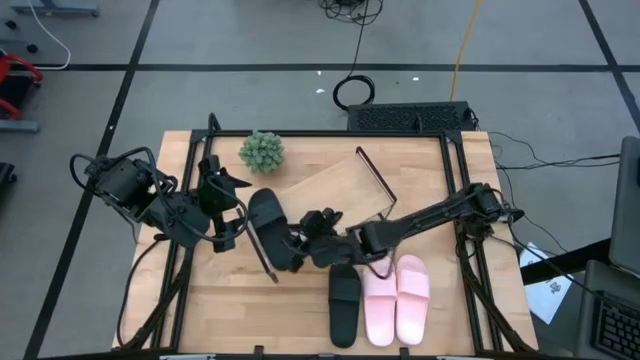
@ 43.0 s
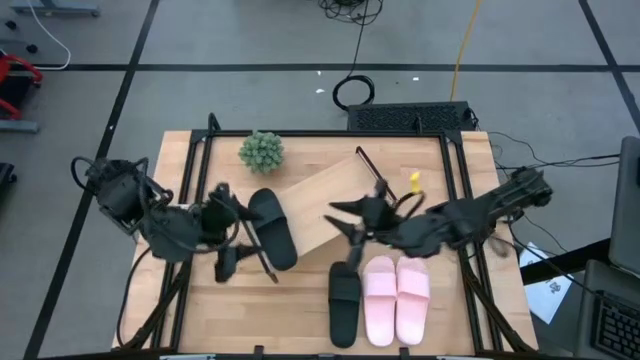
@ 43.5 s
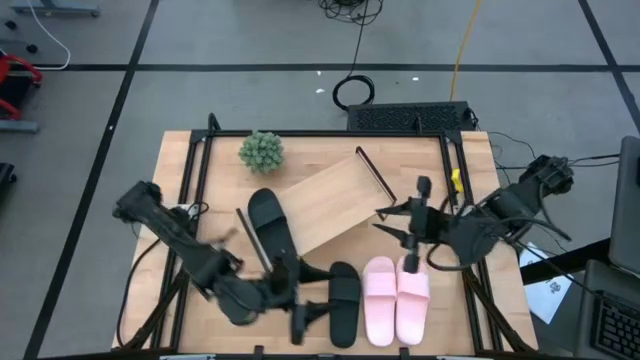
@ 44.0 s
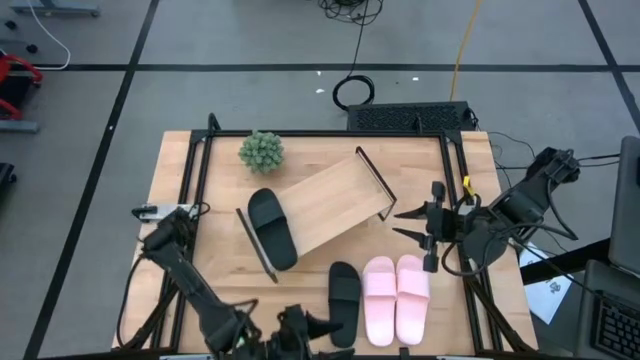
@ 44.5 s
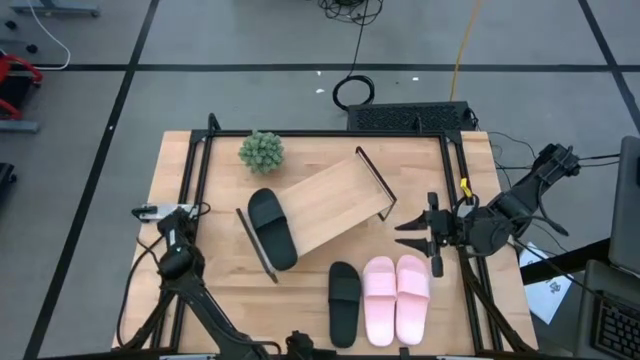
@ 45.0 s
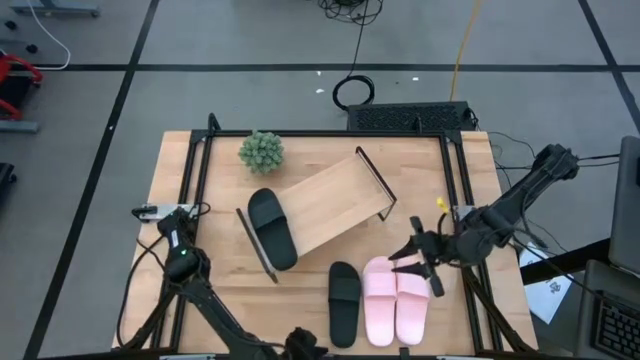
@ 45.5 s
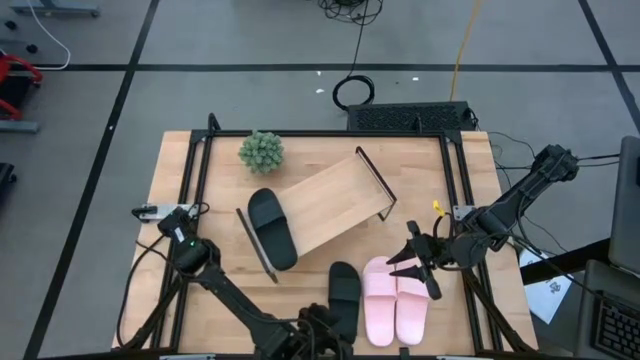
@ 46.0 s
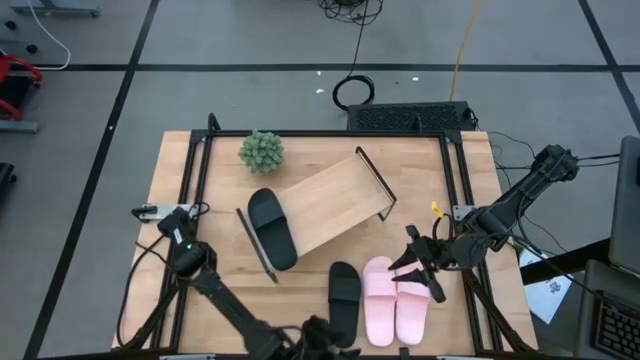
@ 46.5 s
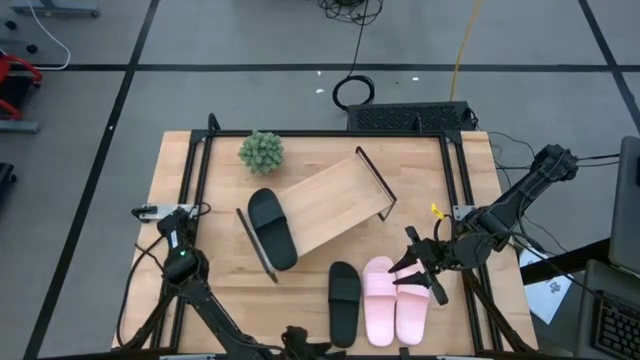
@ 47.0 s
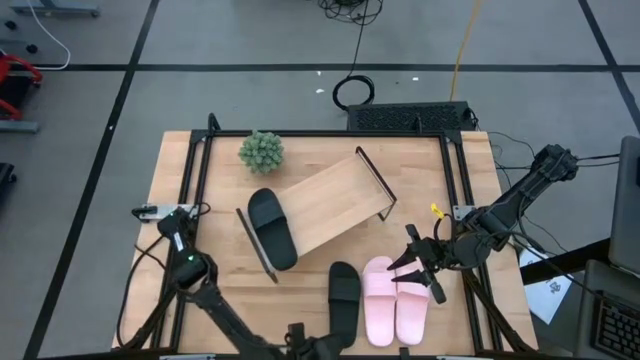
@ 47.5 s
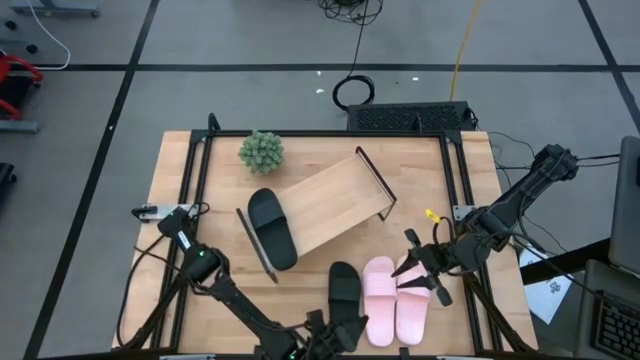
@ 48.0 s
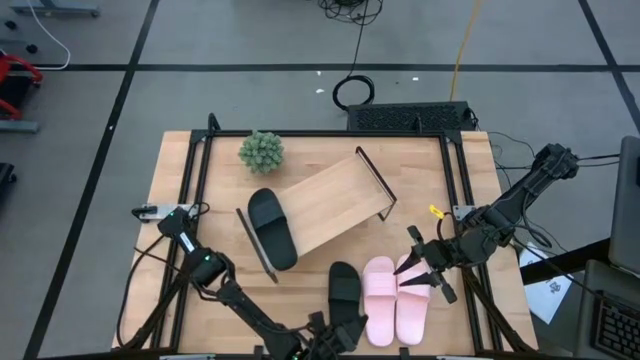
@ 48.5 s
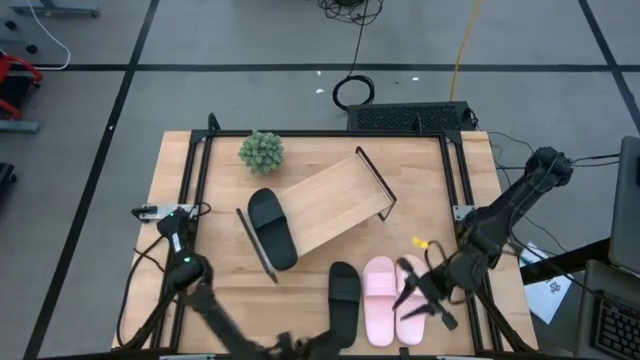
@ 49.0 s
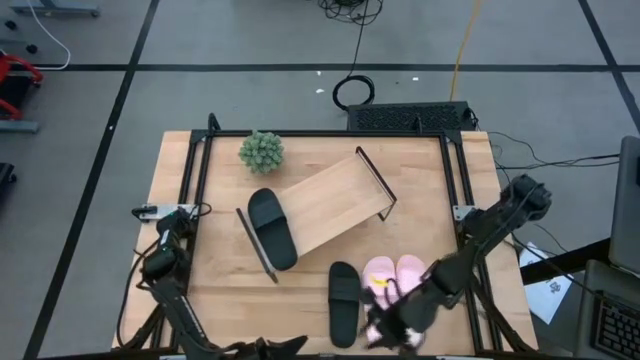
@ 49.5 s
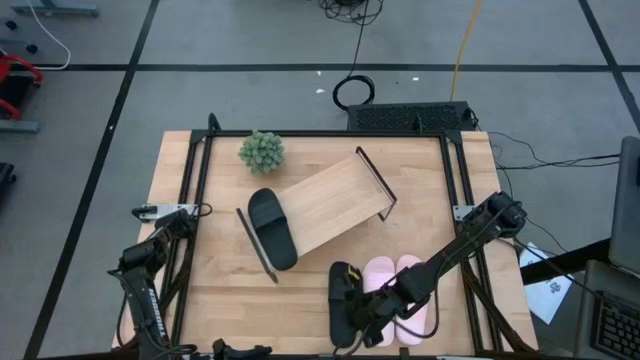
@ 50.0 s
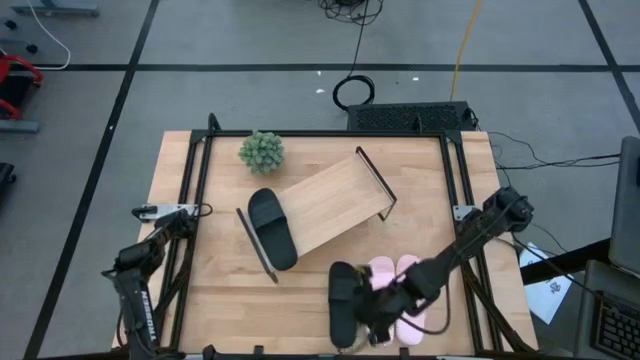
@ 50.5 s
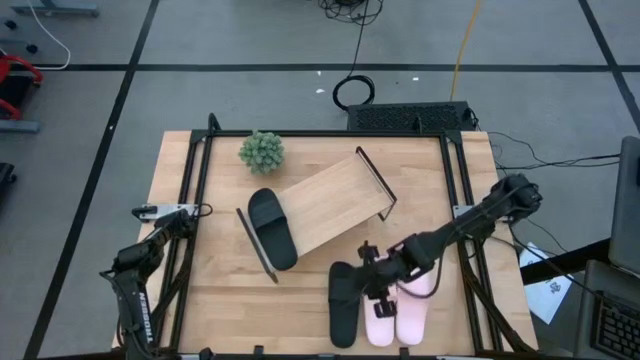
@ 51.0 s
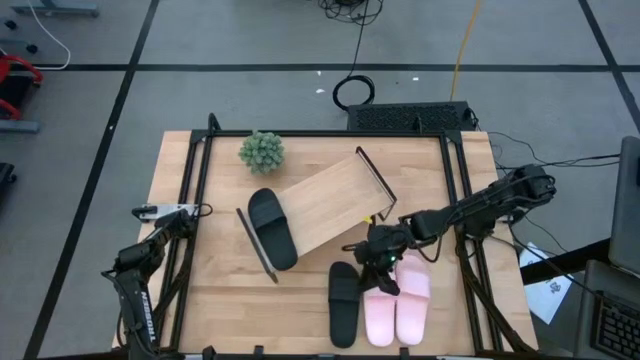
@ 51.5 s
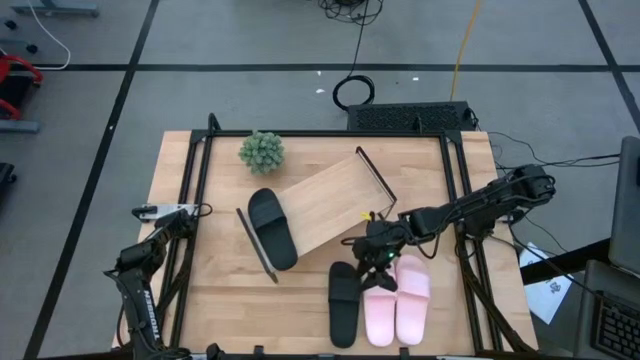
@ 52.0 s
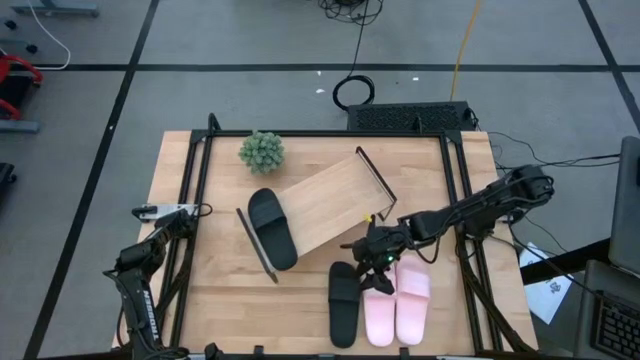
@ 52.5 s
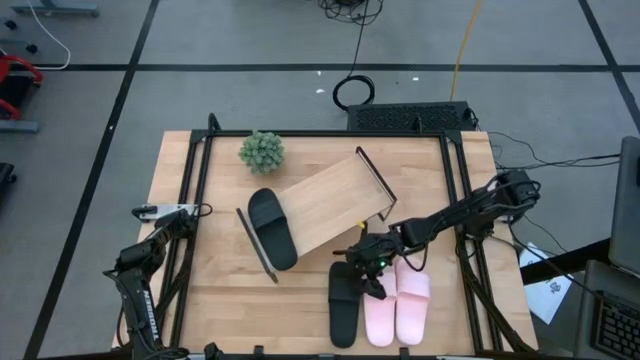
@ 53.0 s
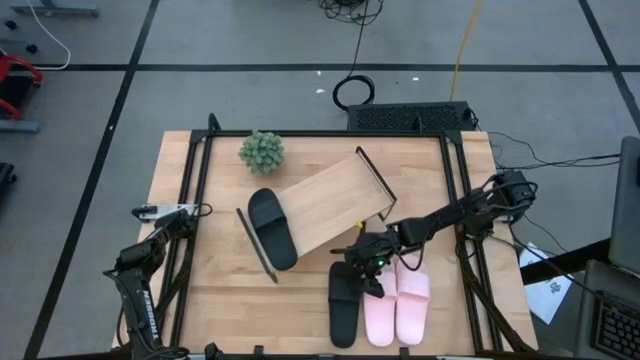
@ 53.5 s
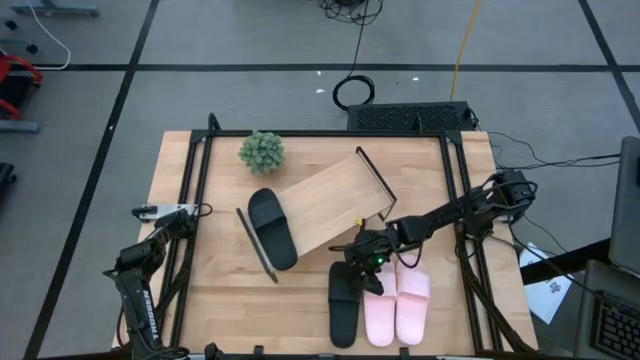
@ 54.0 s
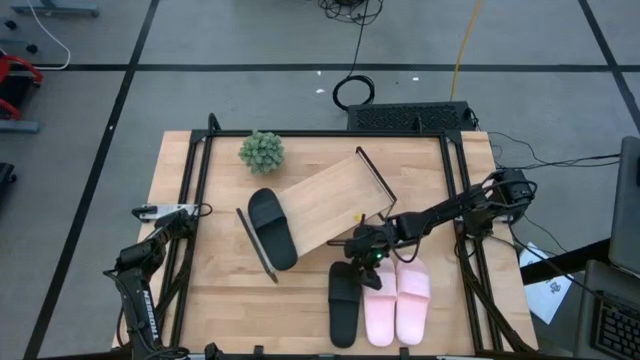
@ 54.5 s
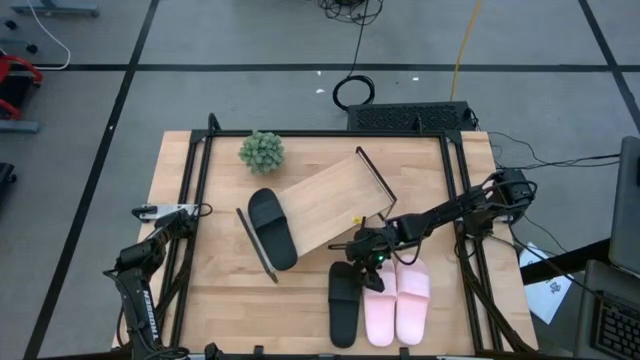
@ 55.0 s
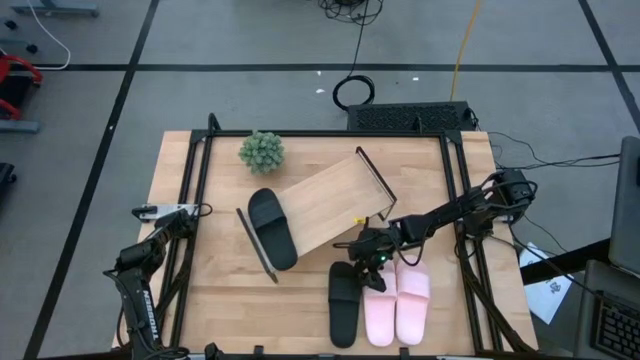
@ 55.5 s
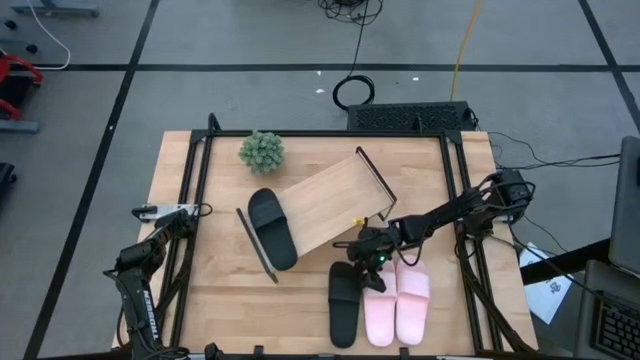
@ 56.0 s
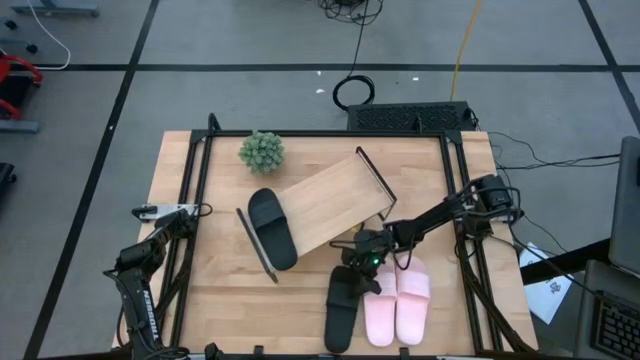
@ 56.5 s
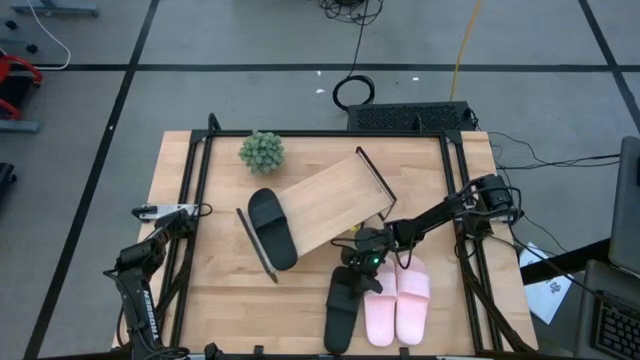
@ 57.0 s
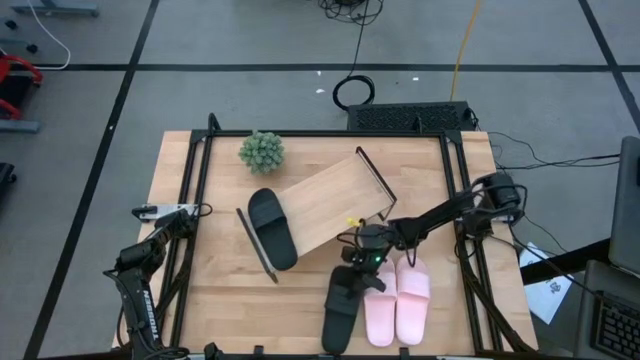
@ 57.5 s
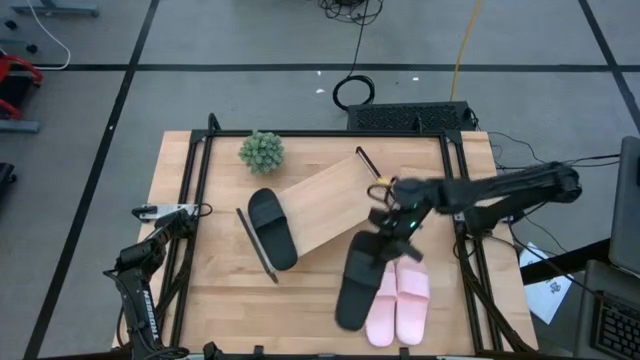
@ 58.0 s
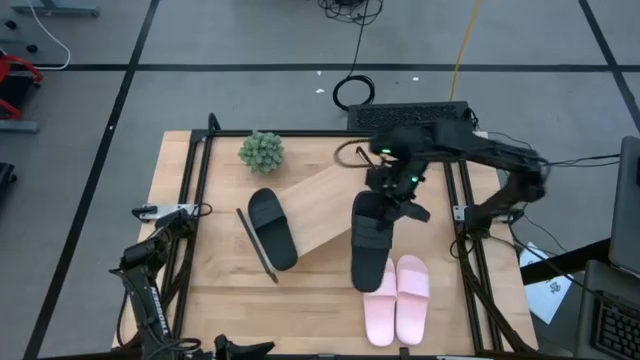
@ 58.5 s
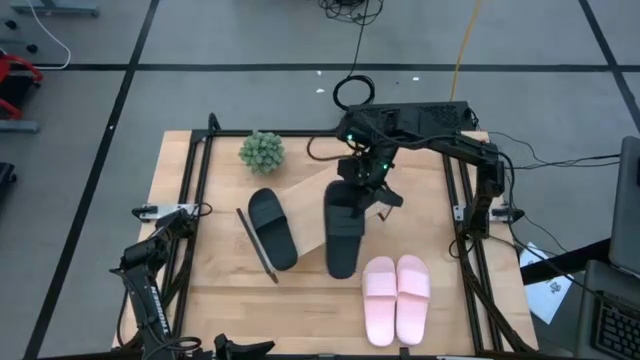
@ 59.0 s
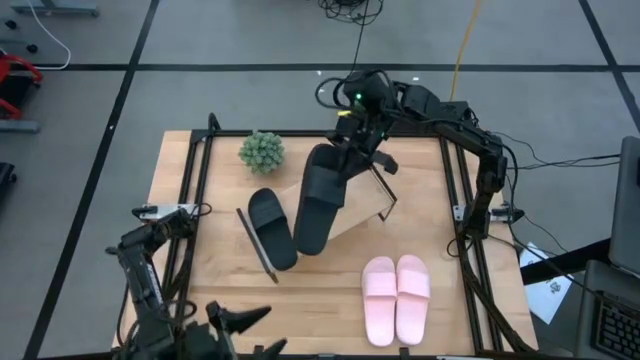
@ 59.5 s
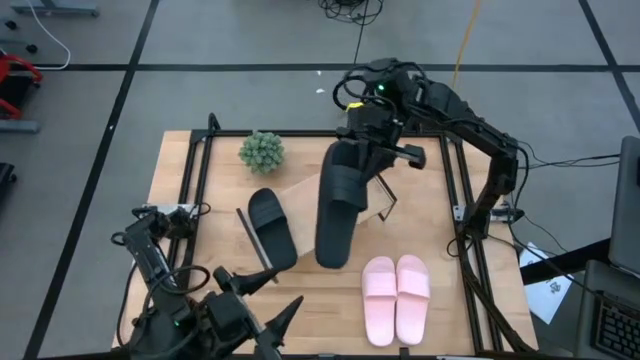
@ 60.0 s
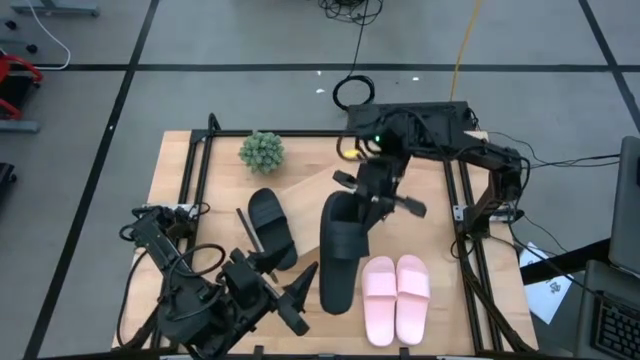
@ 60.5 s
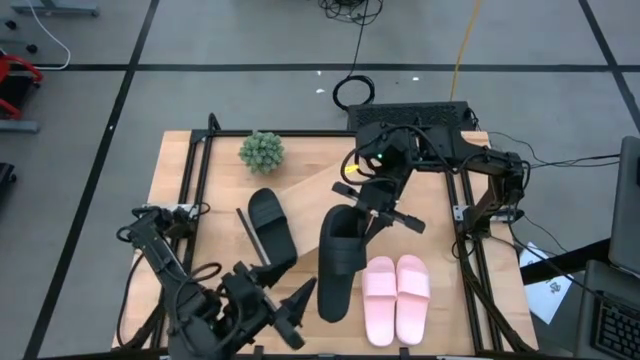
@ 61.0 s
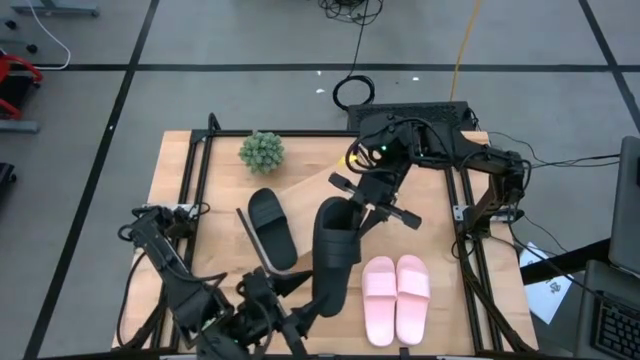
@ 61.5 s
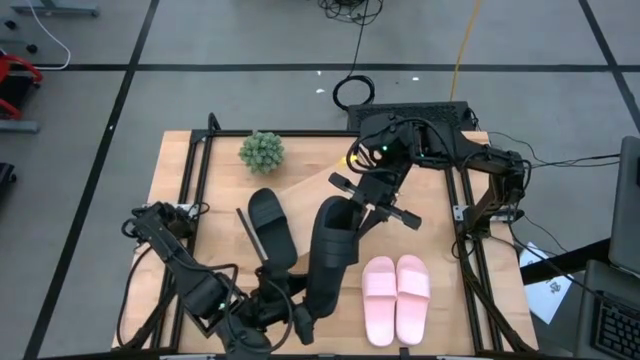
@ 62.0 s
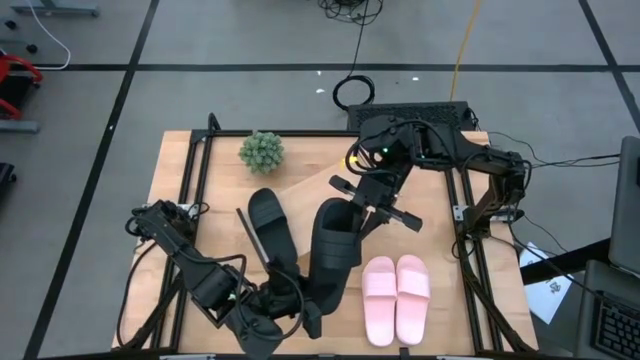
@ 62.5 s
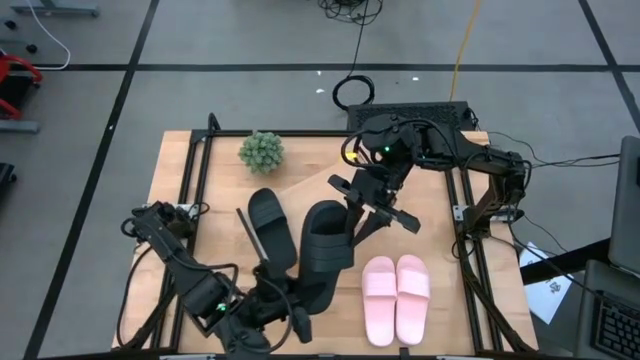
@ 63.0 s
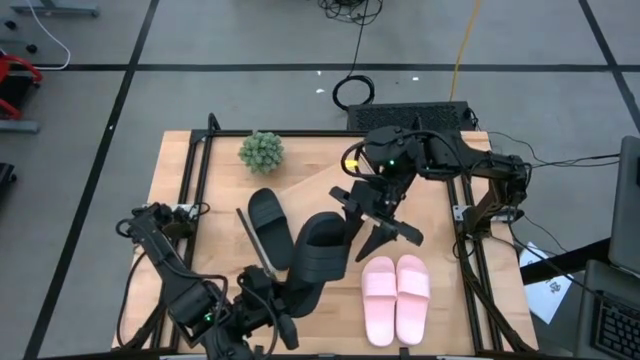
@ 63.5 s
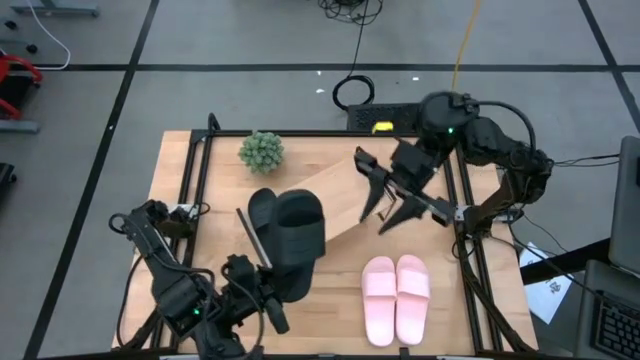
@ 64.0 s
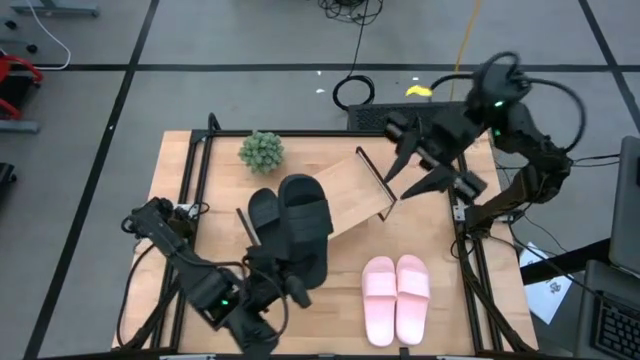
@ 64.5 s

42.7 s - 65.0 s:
Task: Pick and place slides into the shelf
Put the black slide on the shelf
